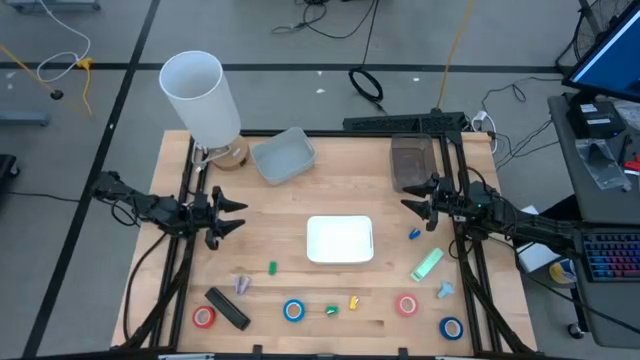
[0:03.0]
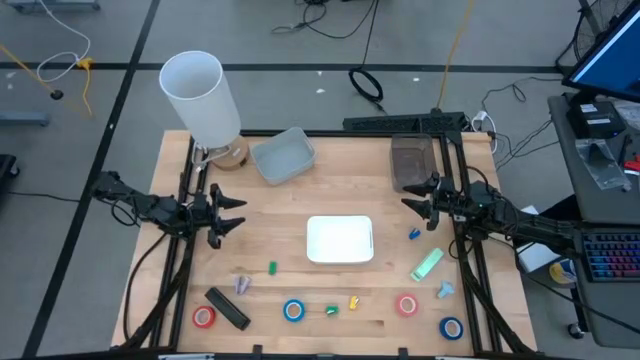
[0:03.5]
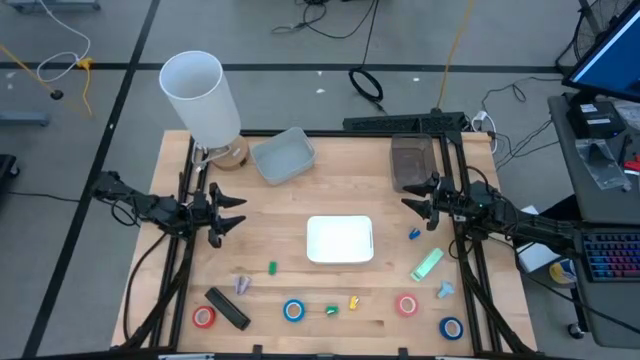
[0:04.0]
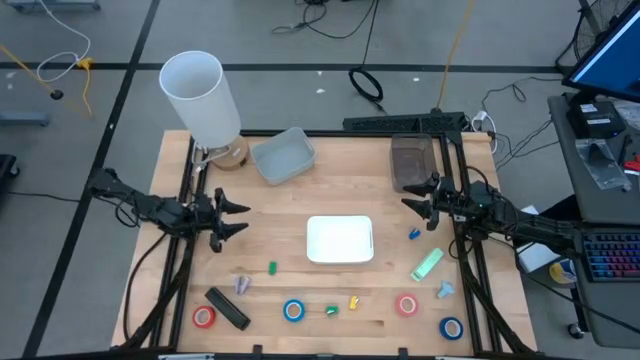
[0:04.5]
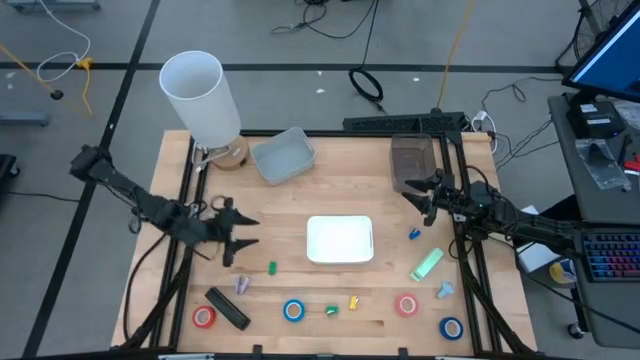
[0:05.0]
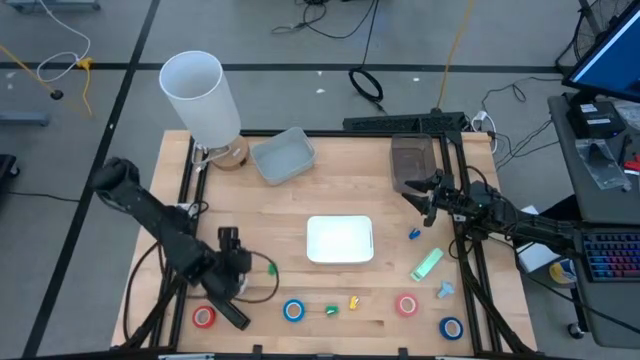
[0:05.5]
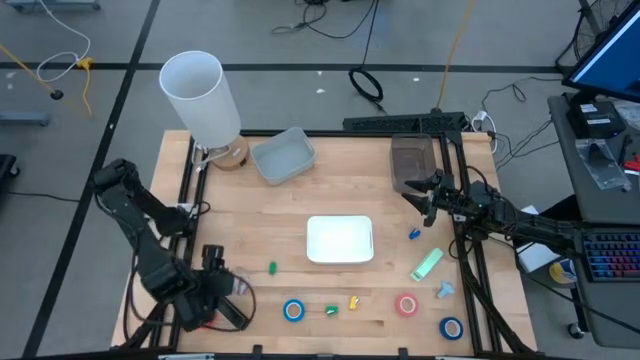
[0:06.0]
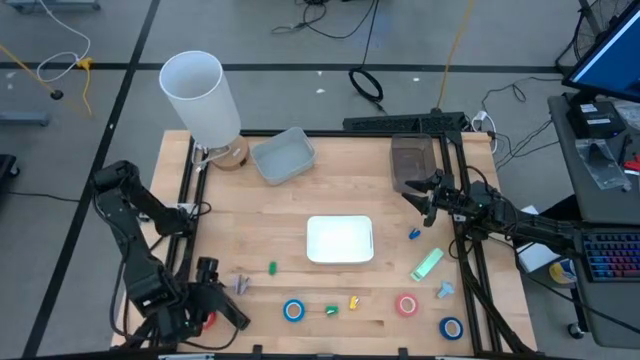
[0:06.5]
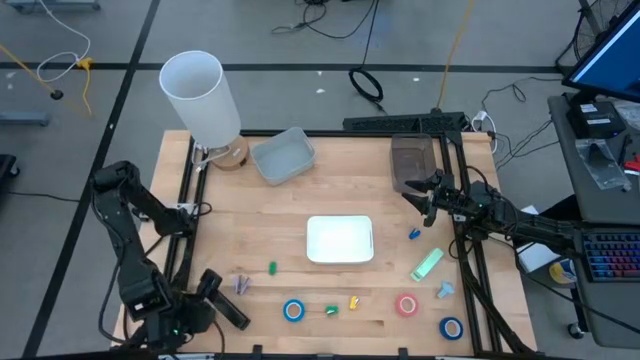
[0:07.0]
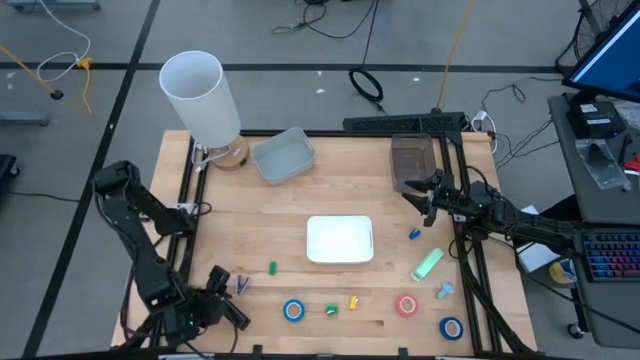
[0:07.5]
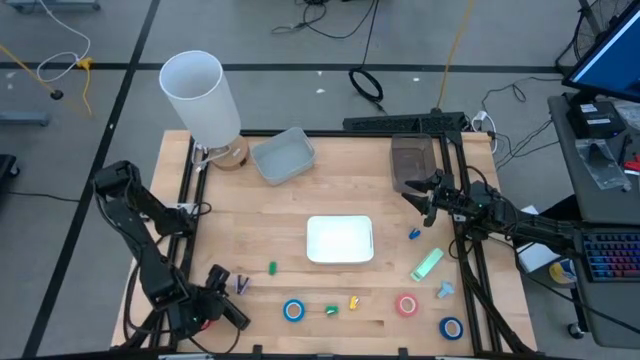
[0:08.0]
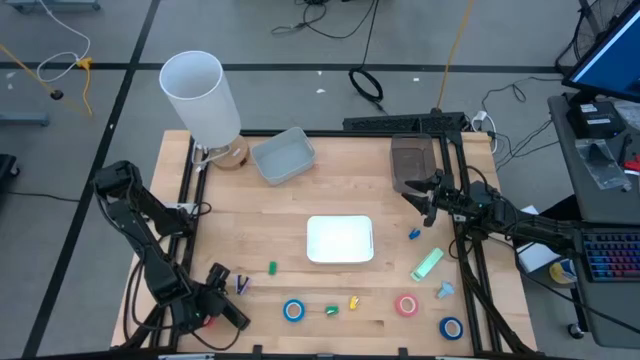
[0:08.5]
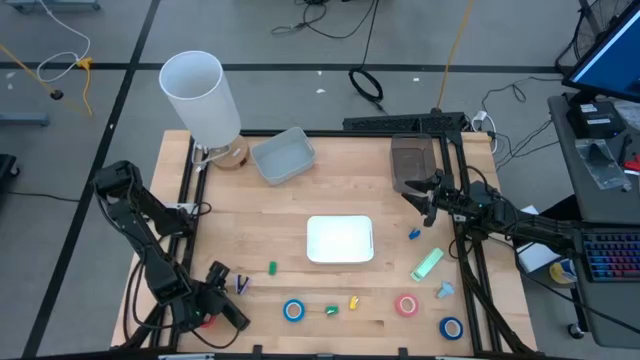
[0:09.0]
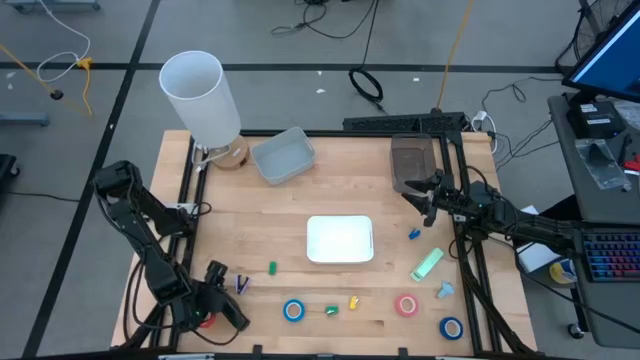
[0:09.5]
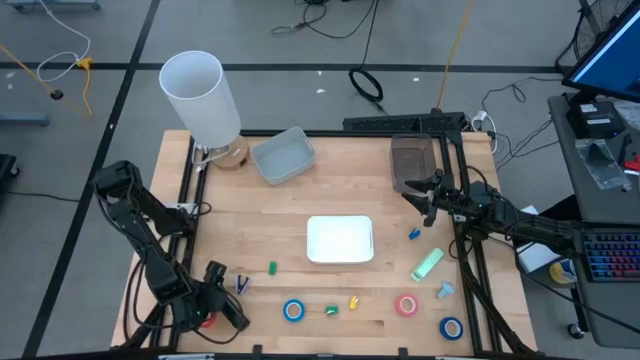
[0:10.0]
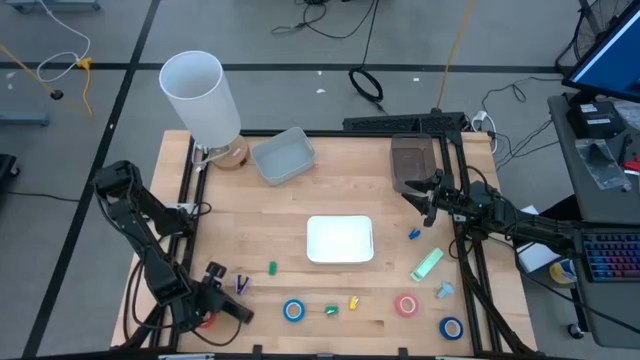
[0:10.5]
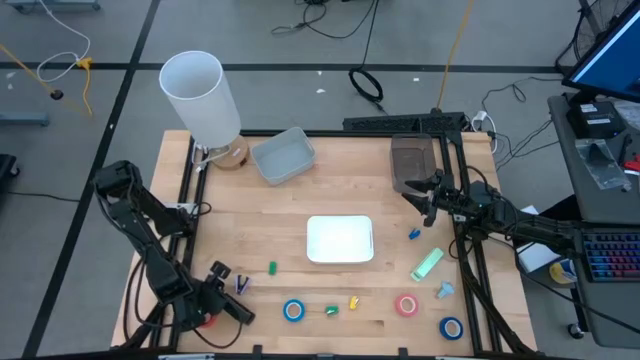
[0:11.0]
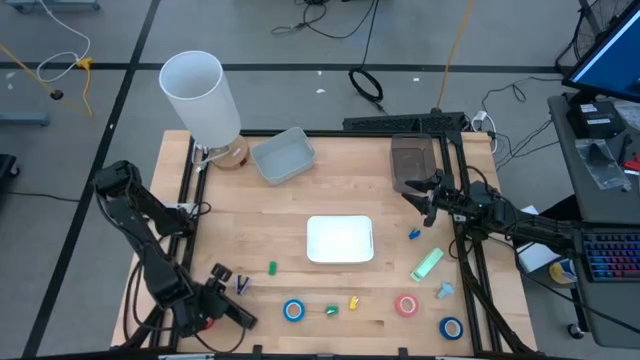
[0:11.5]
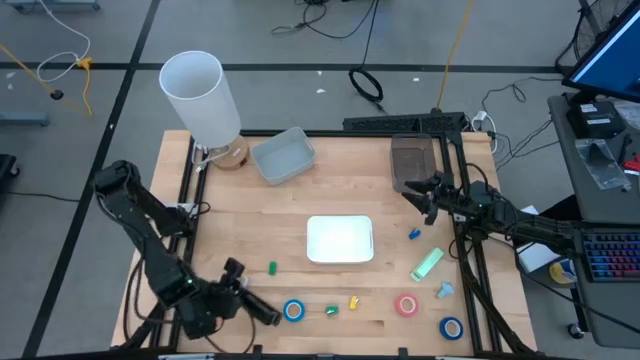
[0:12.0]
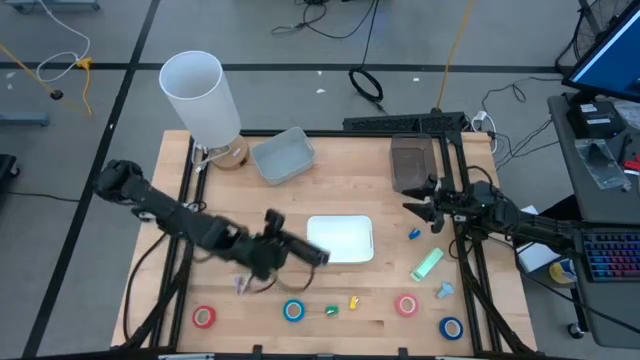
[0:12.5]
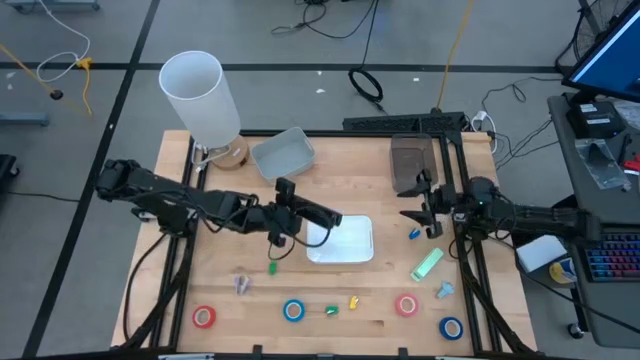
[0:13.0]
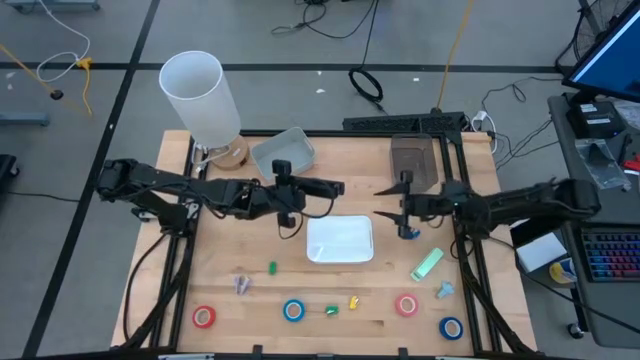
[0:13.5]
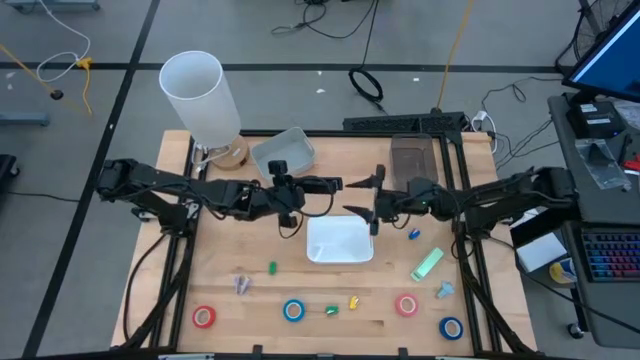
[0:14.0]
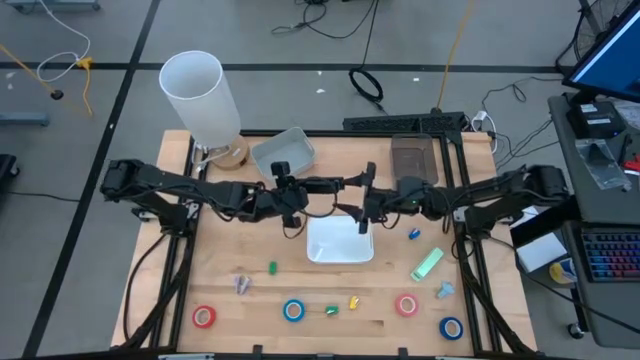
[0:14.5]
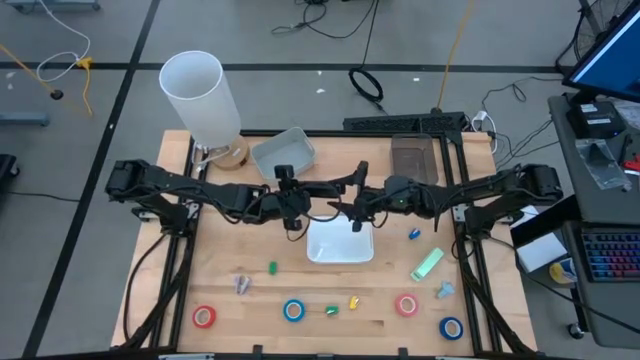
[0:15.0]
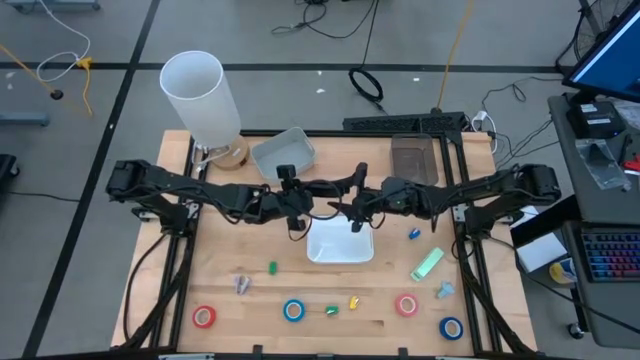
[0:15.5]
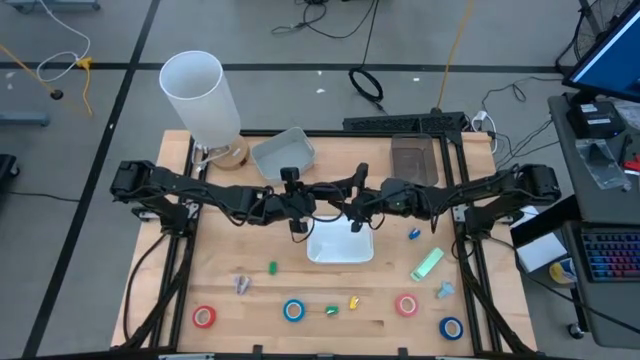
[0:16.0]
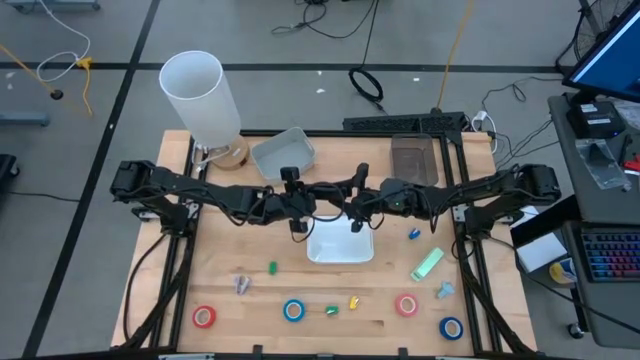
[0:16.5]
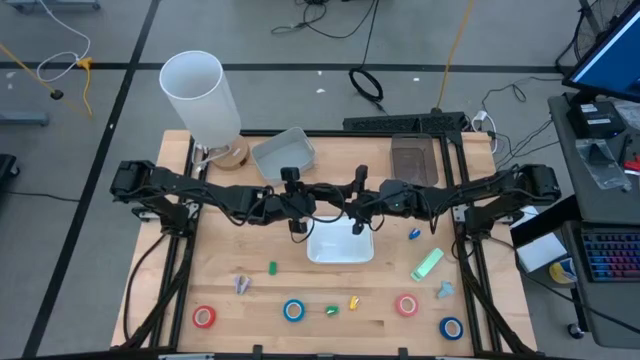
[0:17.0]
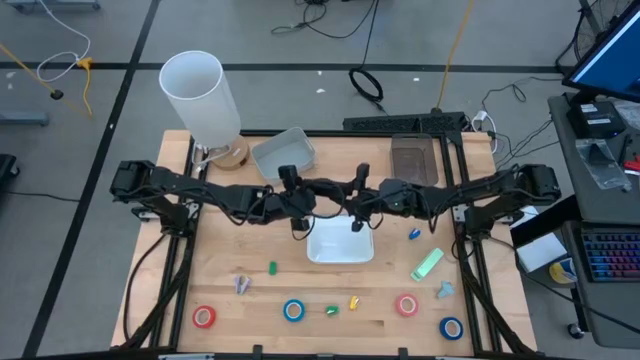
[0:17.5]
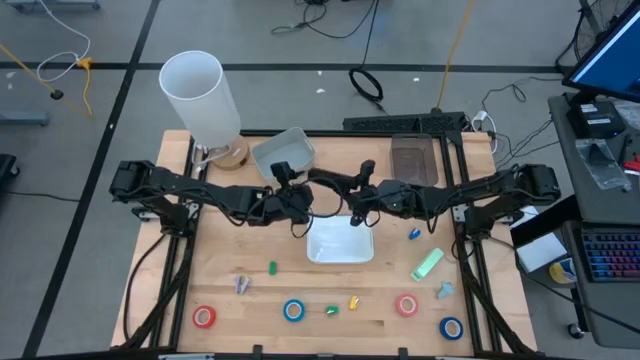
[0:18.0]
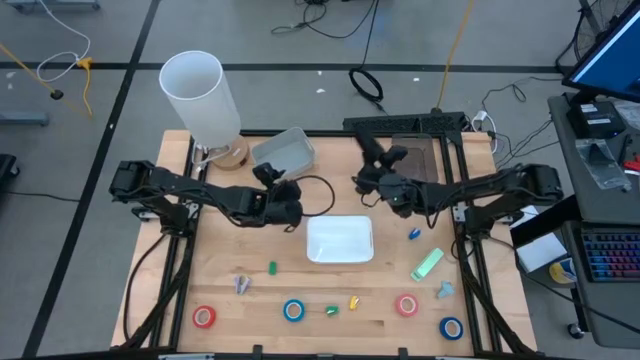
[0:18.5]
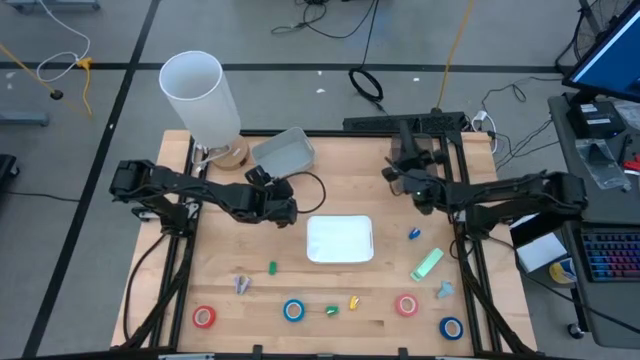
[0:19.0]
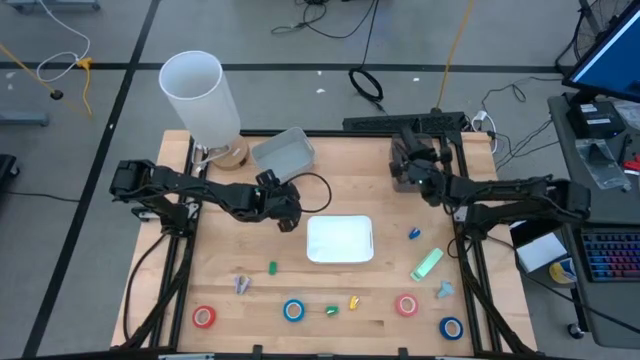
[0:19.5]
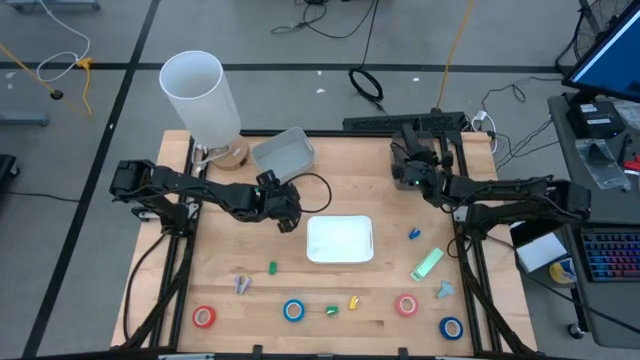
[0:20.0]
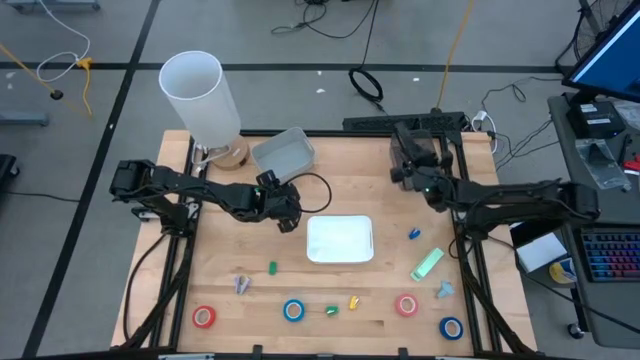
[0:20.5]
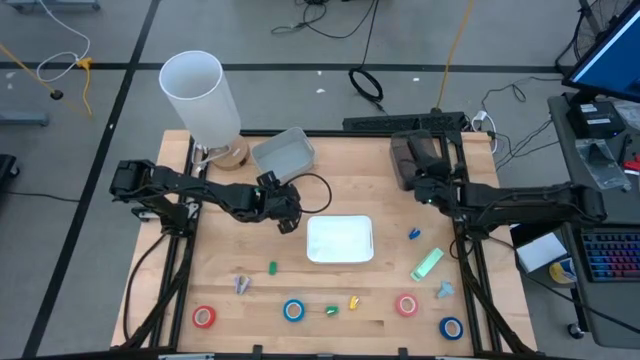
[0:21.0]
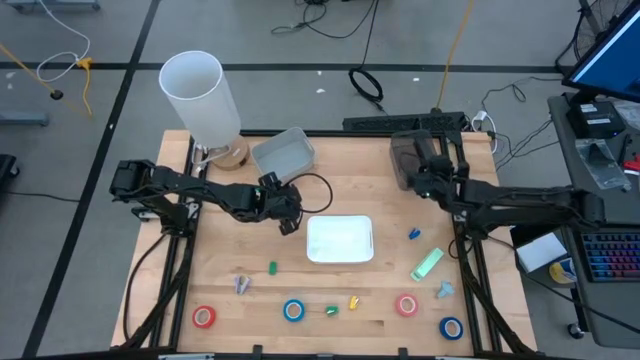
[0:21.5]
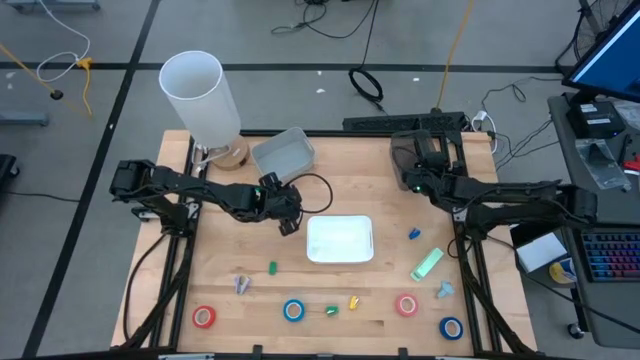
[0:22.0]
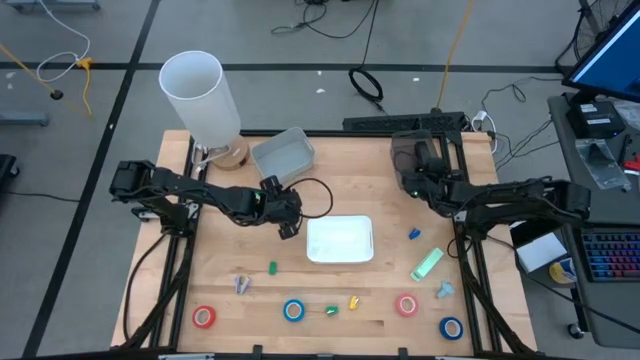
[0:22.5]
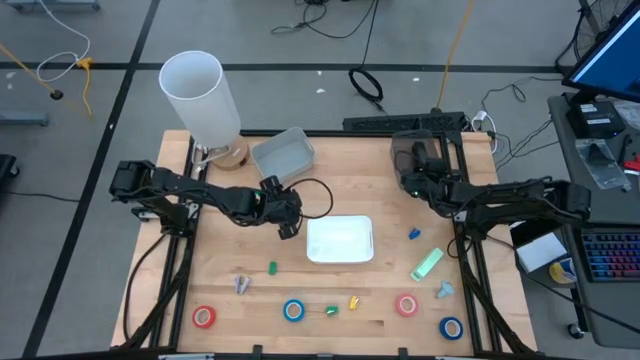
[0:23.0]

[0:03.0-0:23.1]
Task: Pick and place Stapler, Stapler remover, tape
Put the black stapler into the black bin
